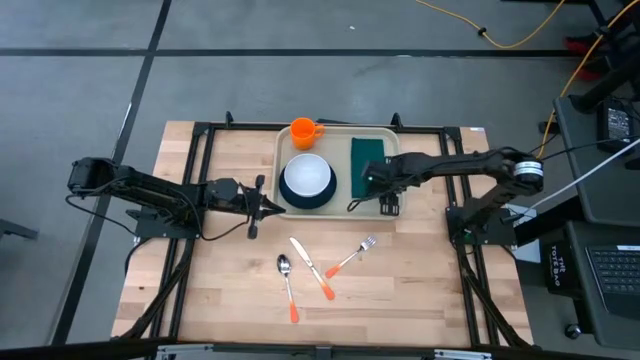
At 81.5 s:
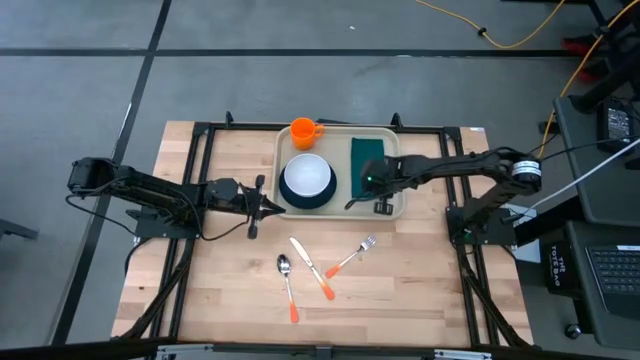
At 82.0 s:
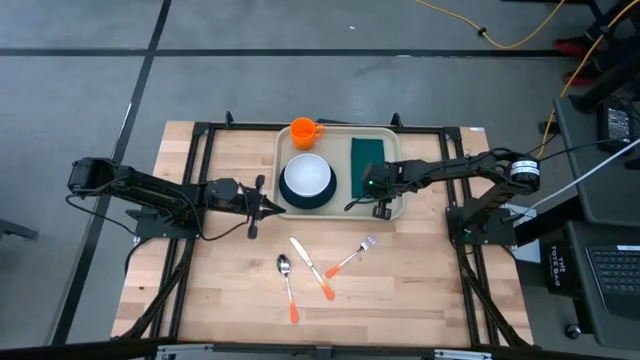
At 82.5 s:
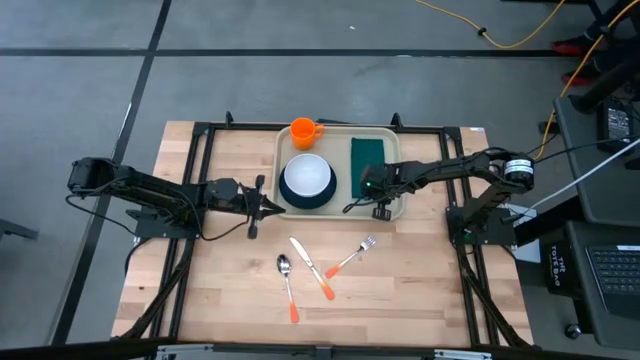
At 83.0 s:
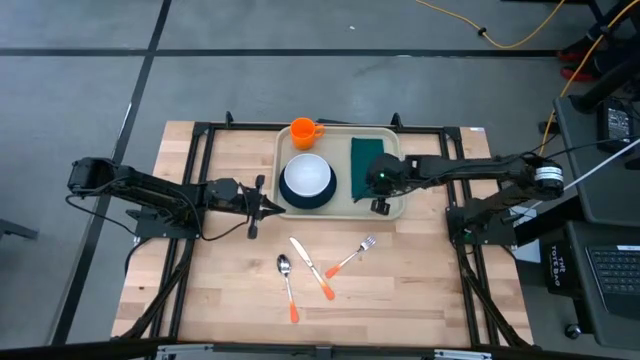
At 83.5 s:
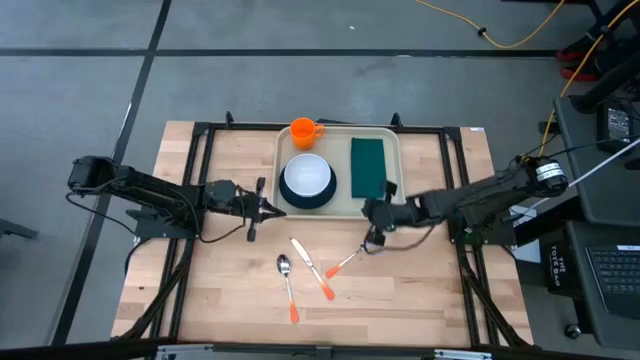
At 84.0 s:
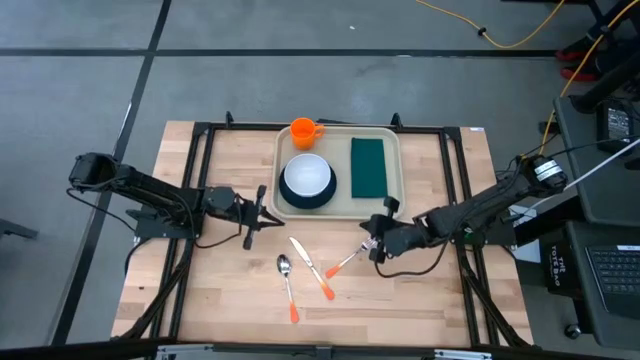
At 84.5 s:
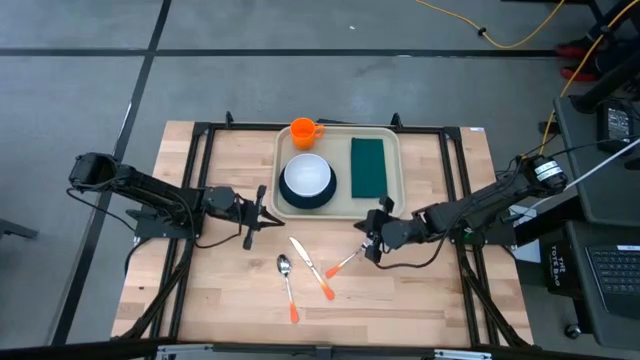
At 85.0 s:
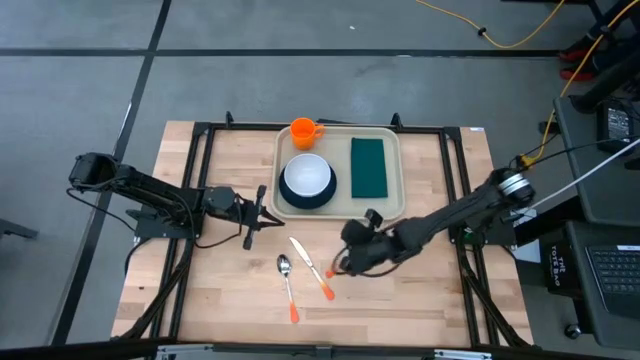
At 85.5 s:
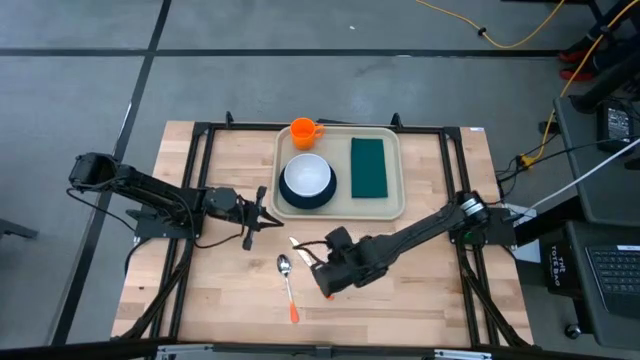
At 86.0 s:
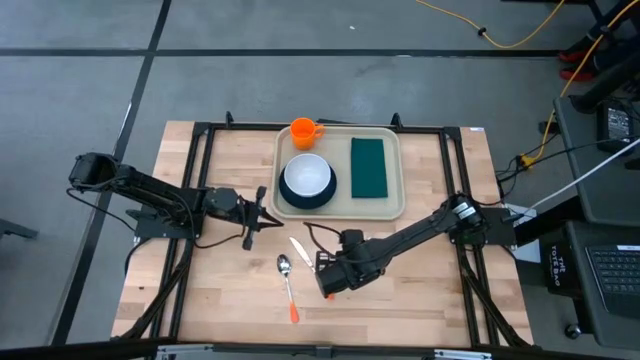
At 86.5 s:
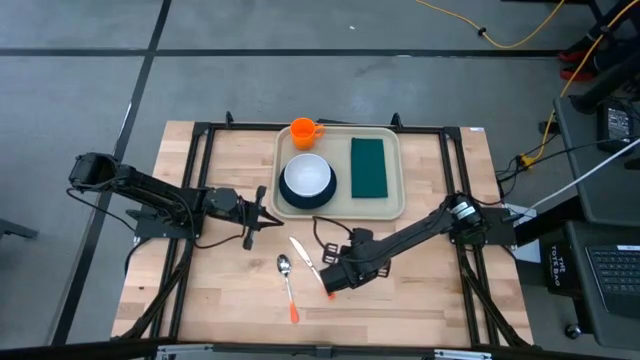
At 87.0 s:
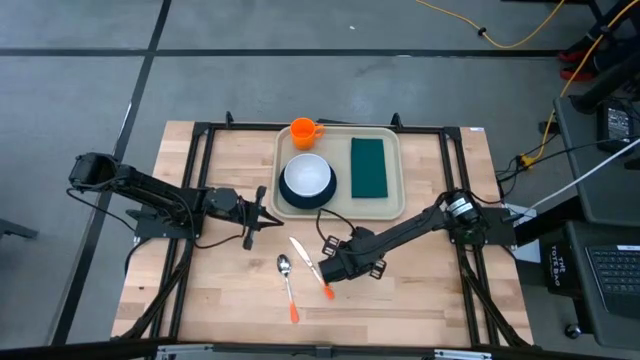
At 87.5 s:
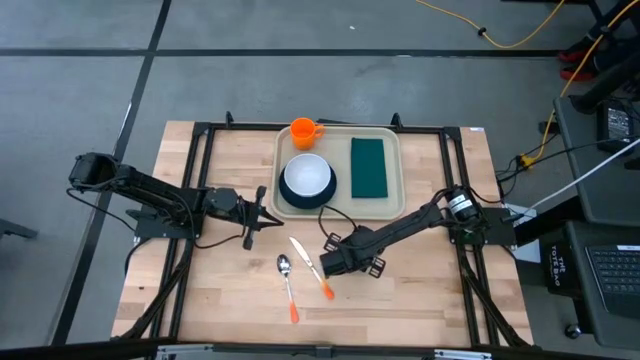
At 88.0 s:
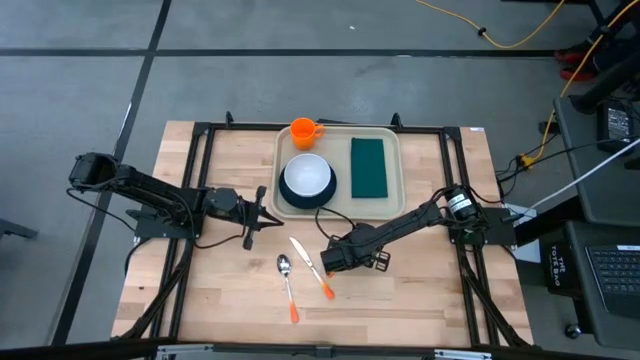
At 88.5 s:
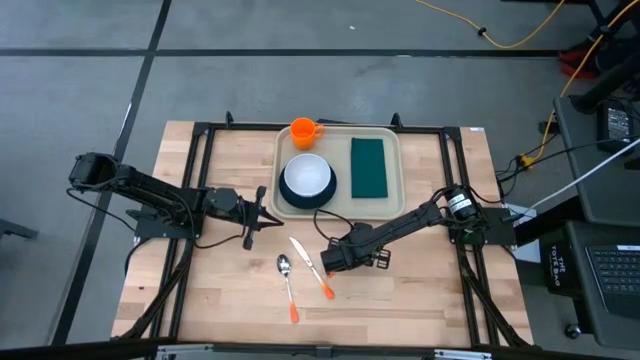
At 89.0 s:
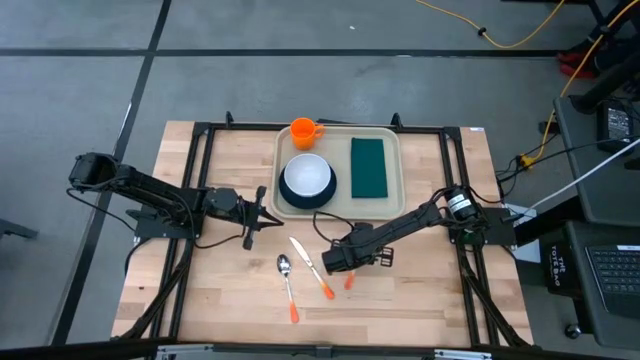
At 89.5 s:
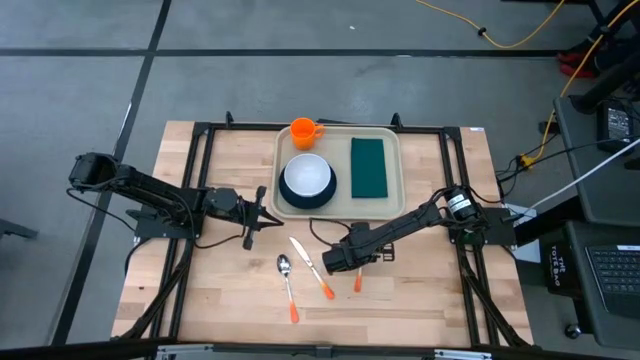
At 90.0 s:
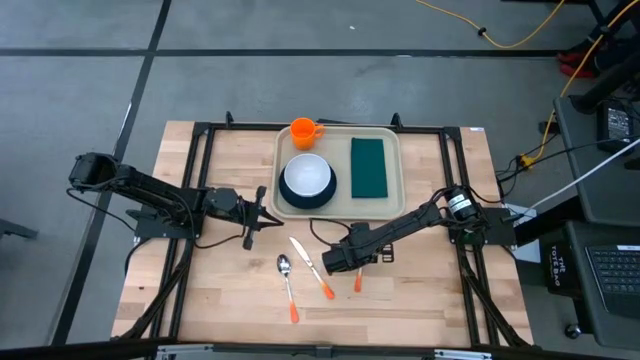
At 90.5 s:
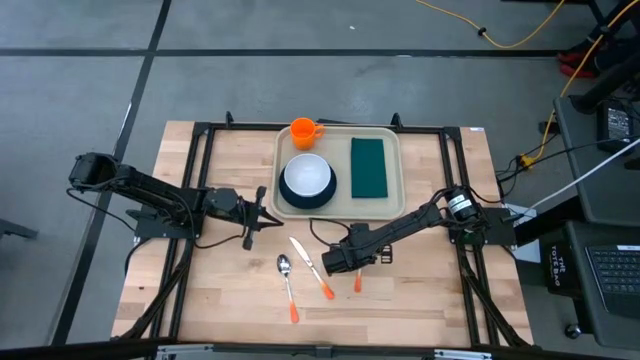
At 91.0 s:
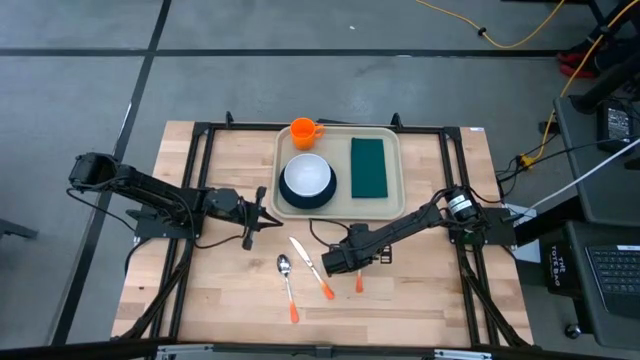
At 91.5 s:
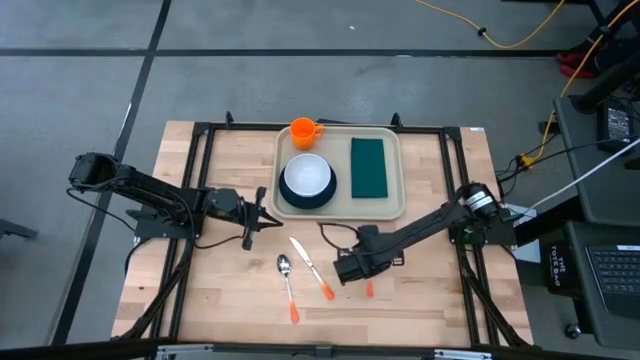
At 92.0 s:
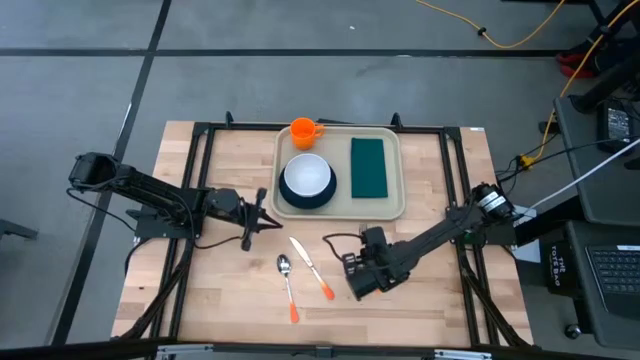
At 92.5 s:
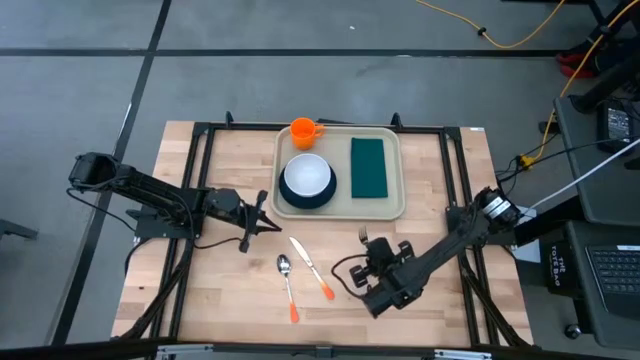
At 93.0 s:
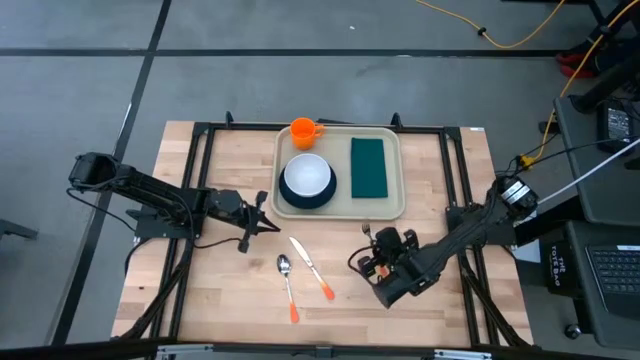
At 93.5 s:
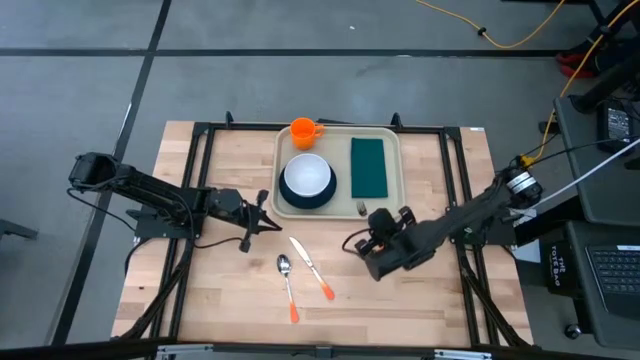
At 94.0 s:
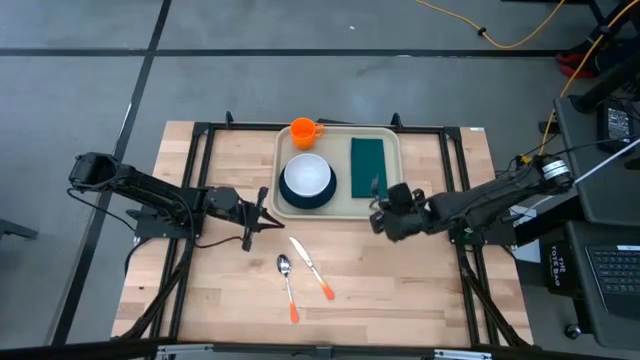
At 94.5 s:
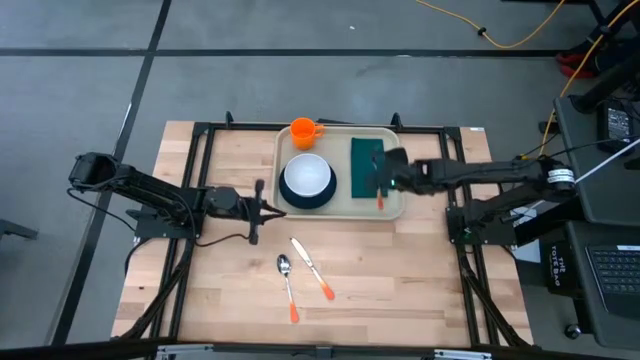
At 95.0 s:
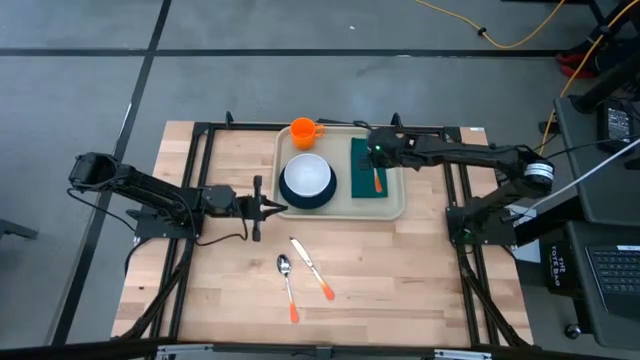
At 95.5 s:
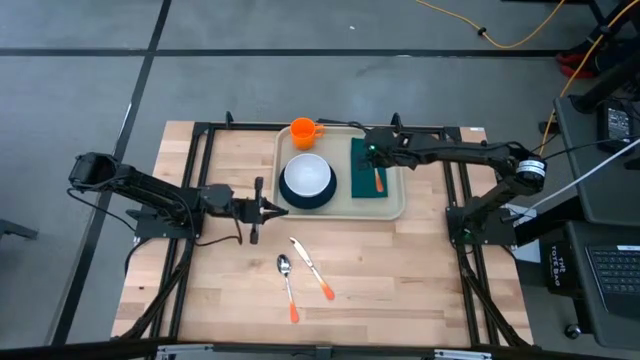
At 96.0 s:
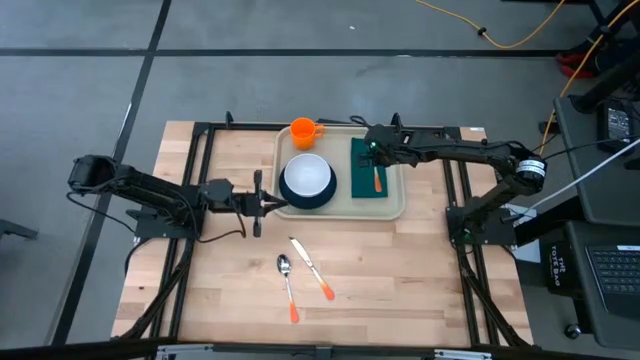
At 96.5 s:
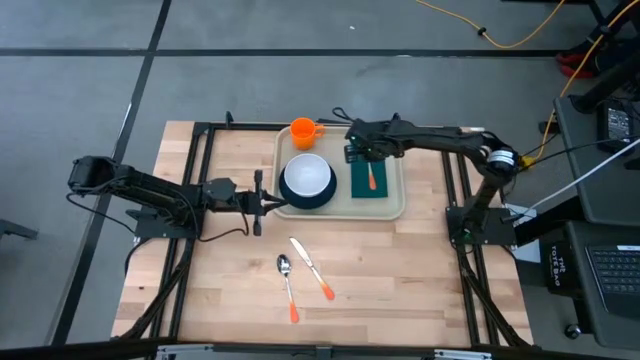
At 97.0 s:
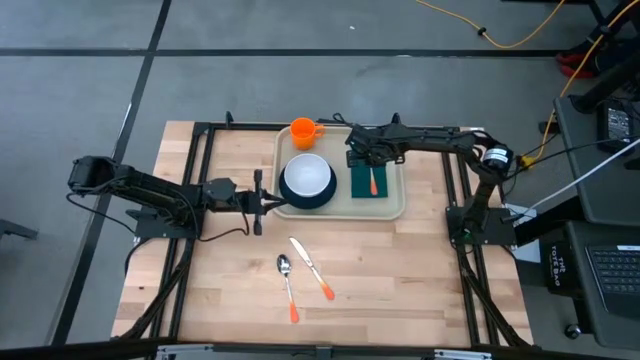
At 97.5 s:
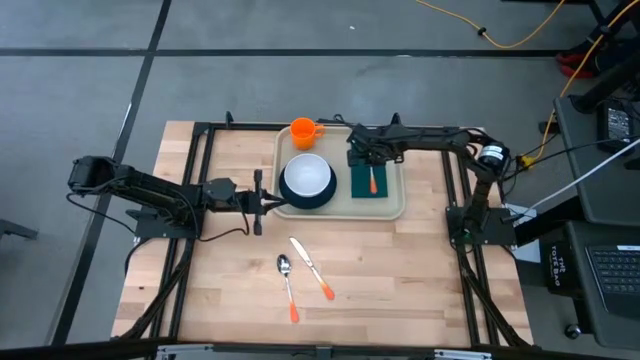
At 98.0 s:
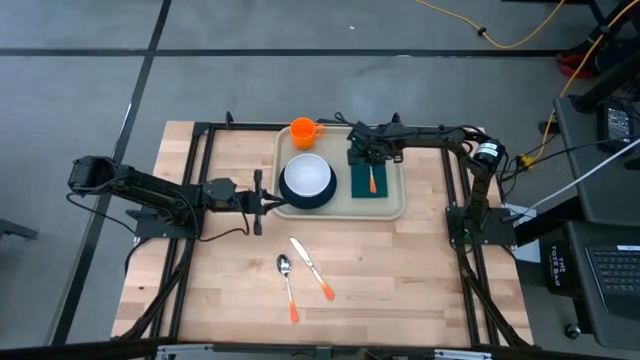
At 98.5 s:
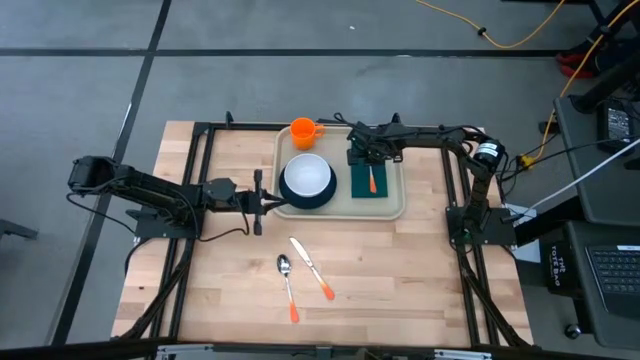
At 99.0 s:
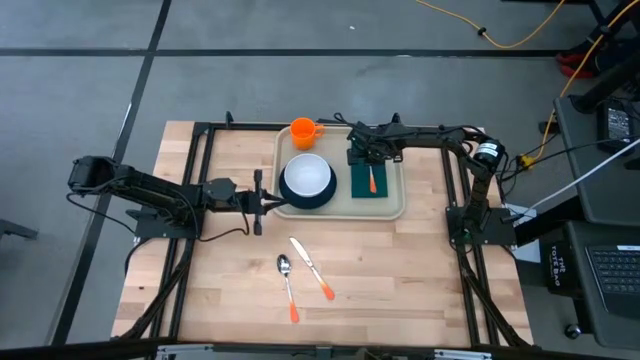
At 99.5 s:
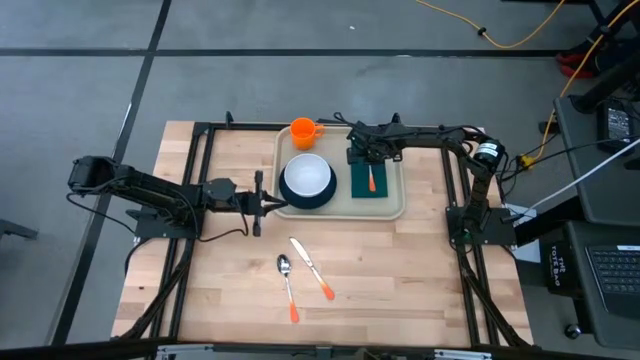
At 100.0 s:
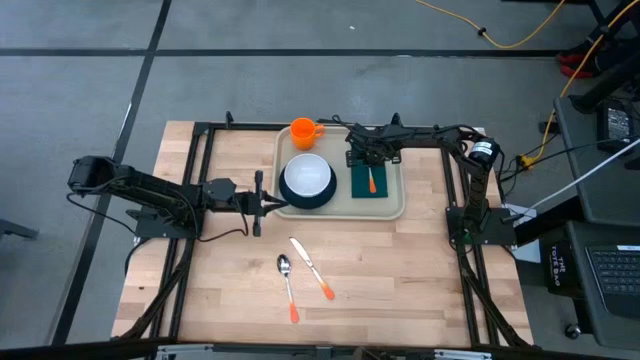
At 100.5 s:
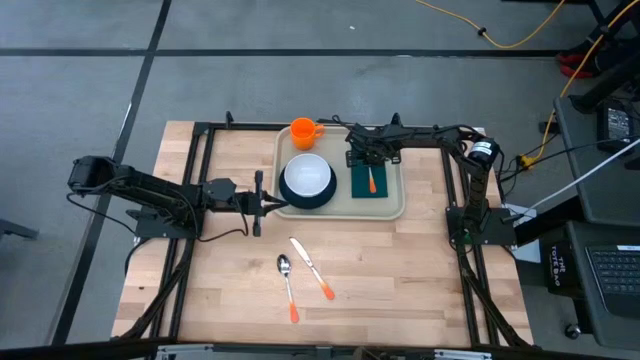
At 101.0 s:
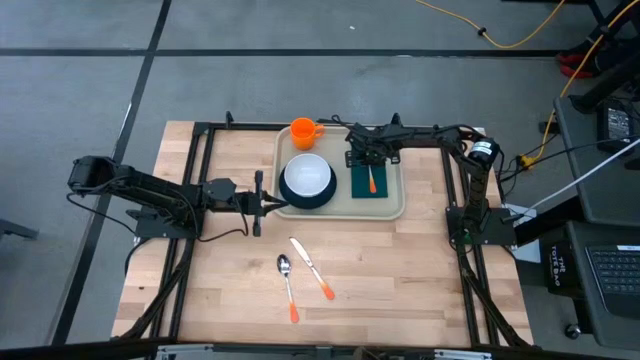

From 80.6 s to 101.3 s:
Task: Set up tray
Put the orange fork on top of the dark green napkin on the gray tray

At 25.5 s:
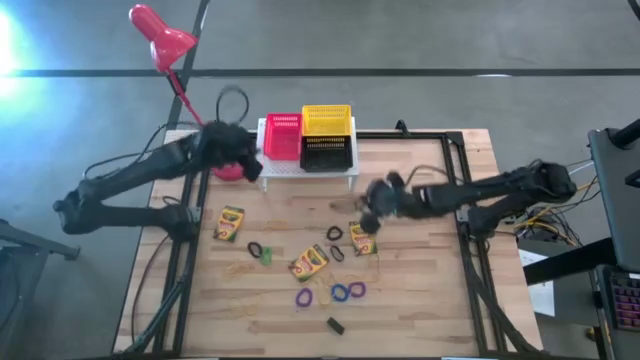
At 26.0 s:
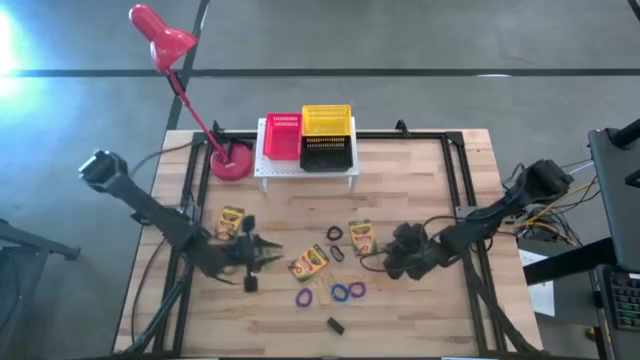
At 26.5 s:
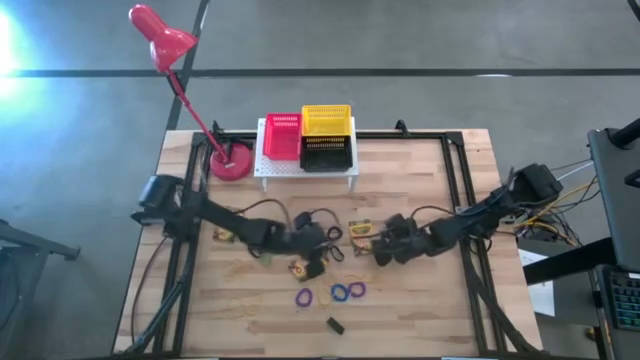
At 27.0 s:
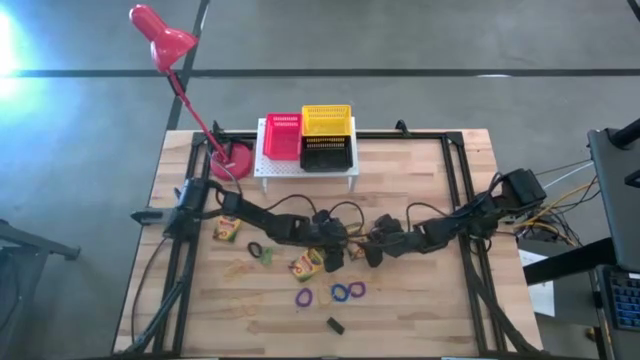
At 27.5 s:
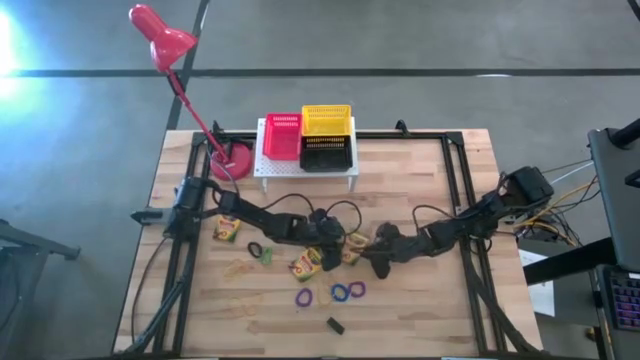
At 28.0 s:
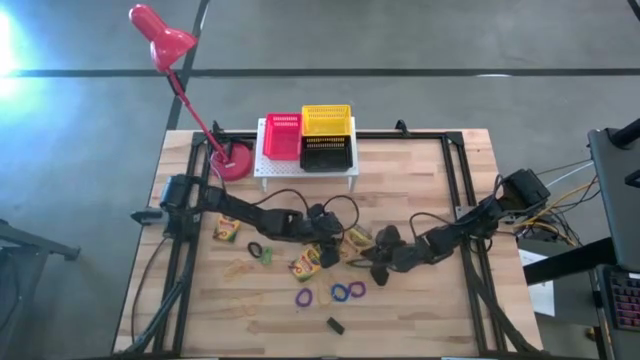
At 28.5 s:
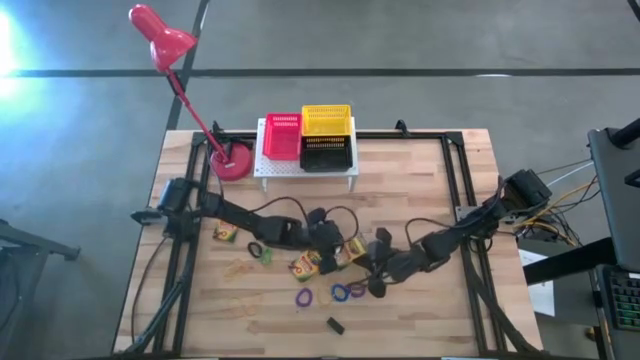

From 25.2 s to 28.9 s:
Task: Pick & Place Office Desk Supplies
Put the right crayon box into the black bin on the shelf
